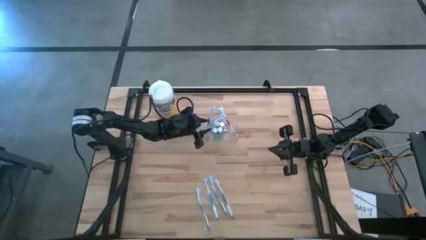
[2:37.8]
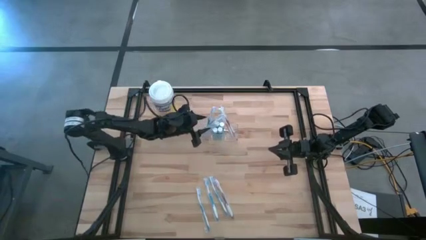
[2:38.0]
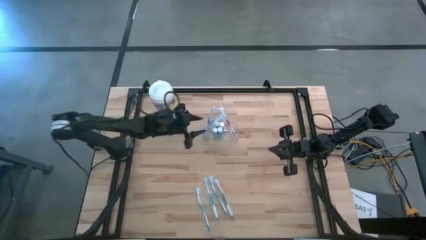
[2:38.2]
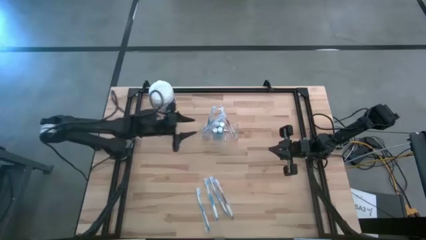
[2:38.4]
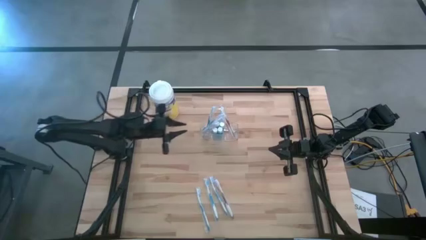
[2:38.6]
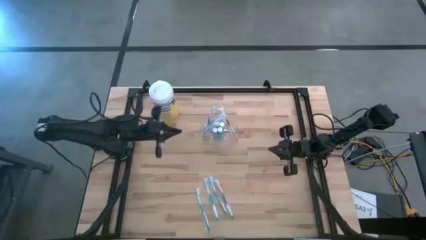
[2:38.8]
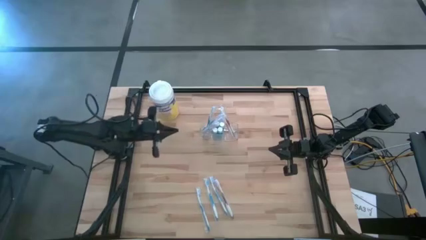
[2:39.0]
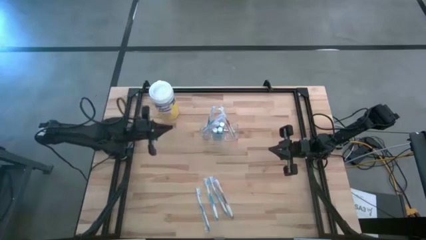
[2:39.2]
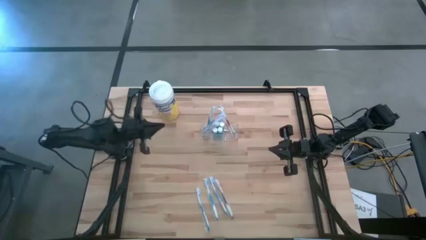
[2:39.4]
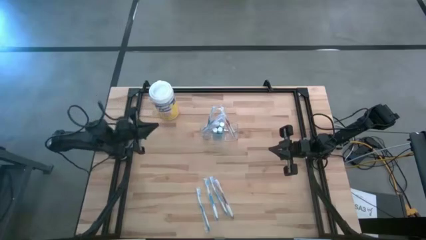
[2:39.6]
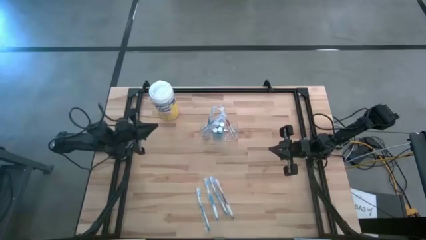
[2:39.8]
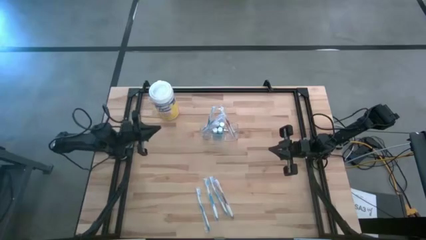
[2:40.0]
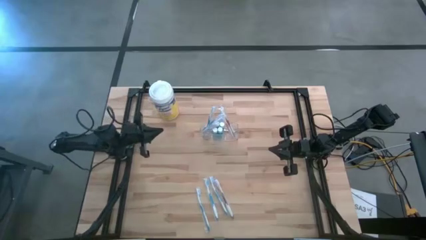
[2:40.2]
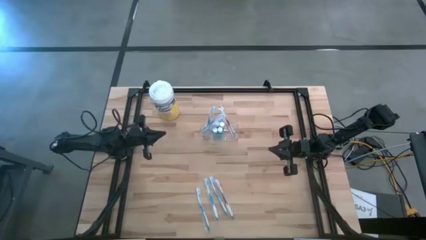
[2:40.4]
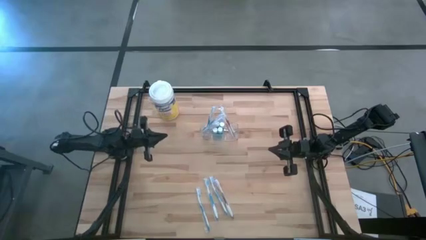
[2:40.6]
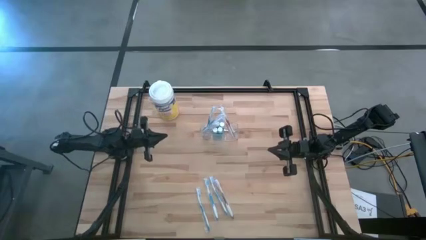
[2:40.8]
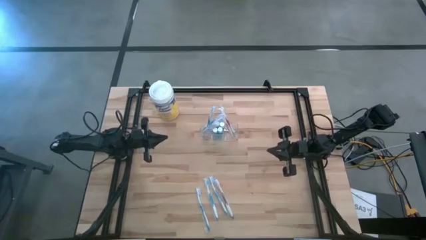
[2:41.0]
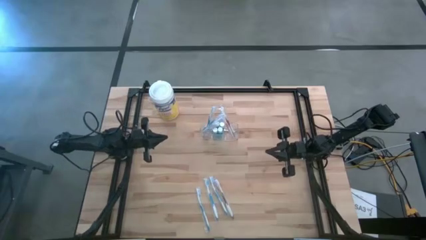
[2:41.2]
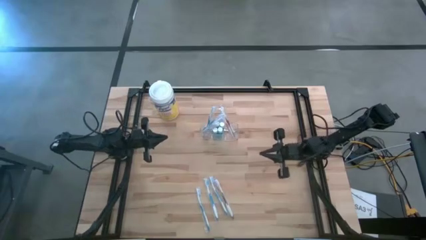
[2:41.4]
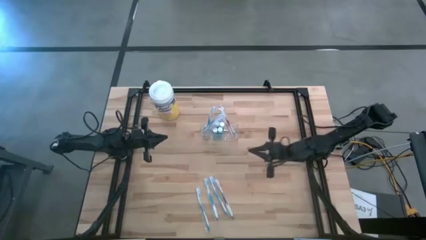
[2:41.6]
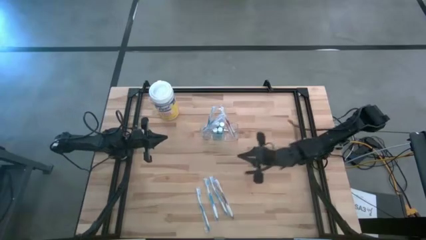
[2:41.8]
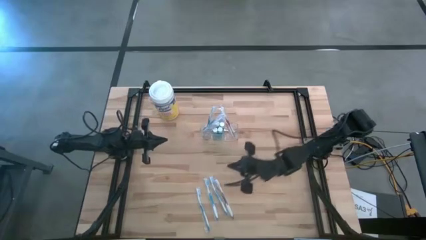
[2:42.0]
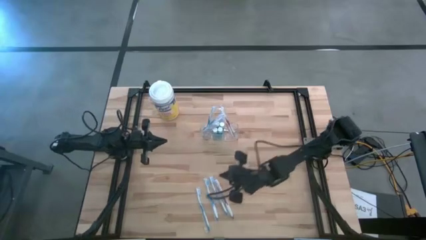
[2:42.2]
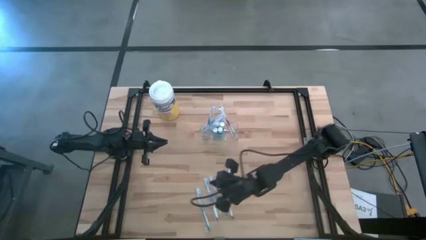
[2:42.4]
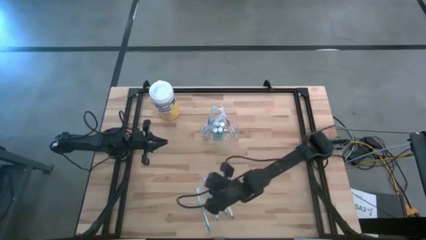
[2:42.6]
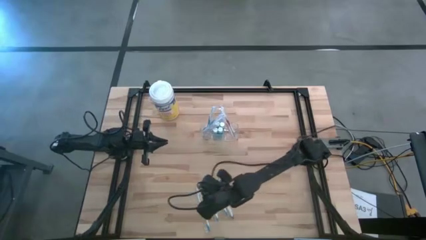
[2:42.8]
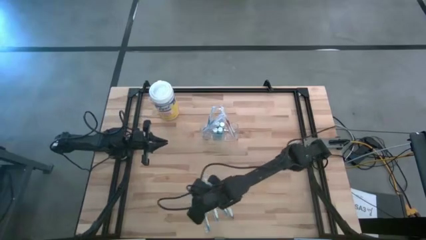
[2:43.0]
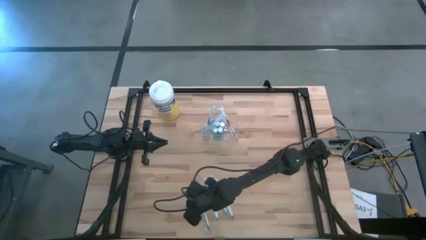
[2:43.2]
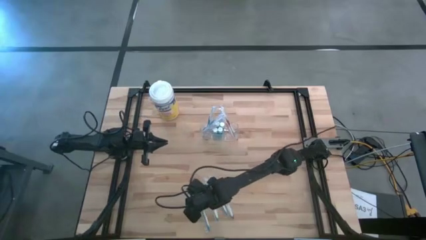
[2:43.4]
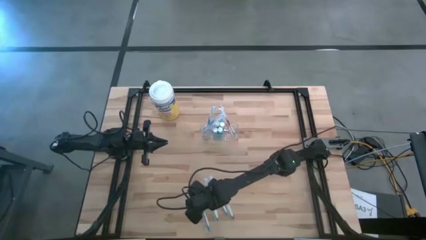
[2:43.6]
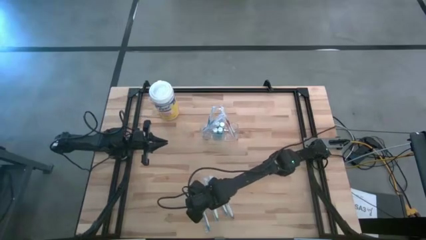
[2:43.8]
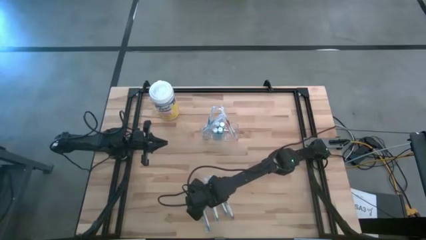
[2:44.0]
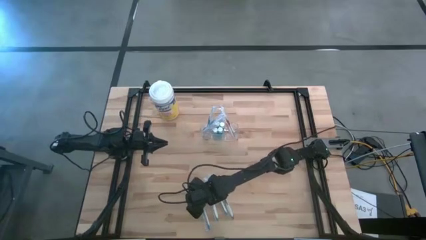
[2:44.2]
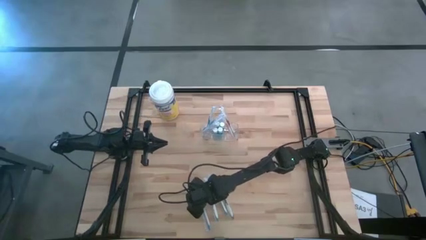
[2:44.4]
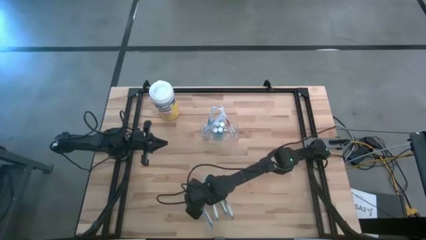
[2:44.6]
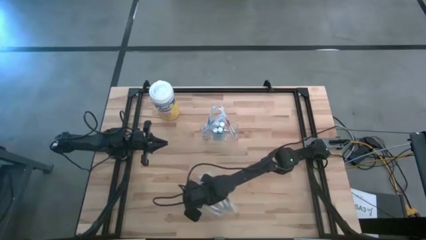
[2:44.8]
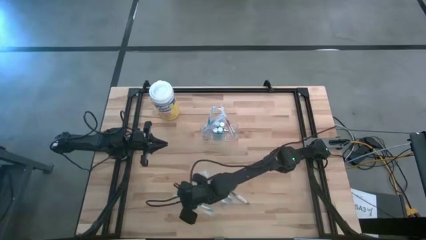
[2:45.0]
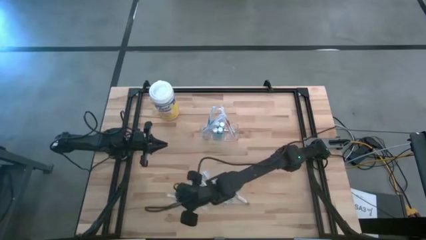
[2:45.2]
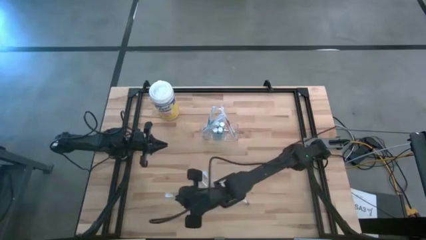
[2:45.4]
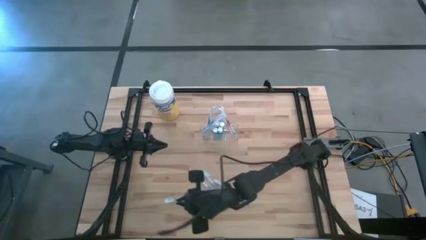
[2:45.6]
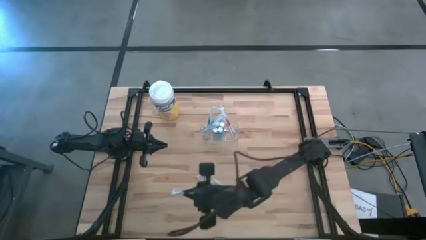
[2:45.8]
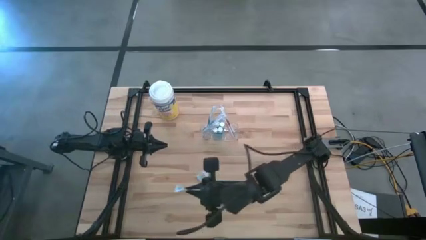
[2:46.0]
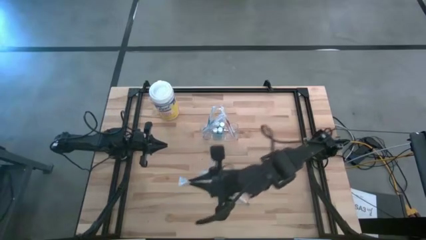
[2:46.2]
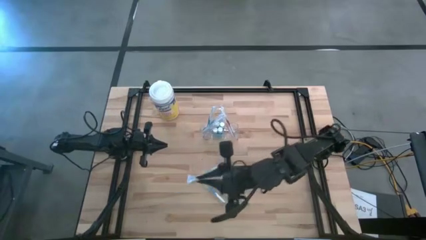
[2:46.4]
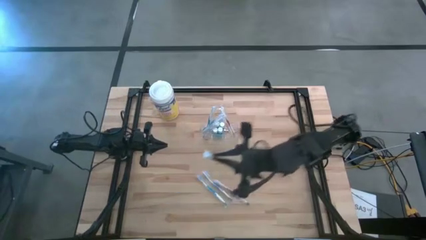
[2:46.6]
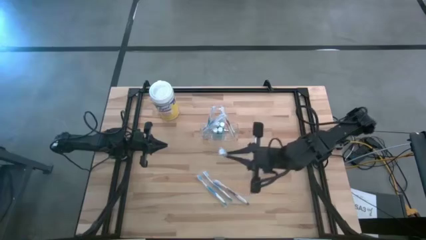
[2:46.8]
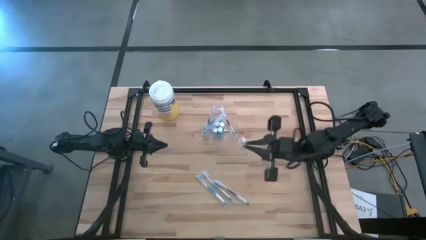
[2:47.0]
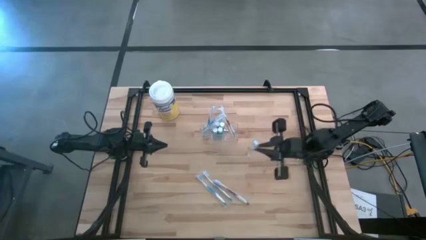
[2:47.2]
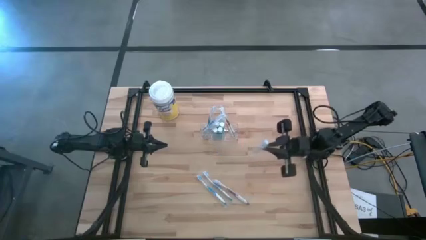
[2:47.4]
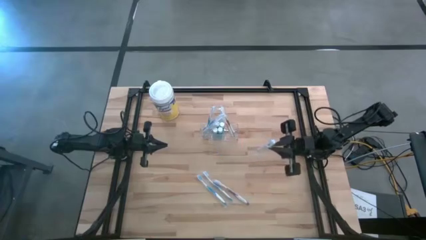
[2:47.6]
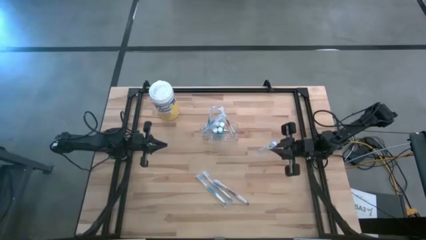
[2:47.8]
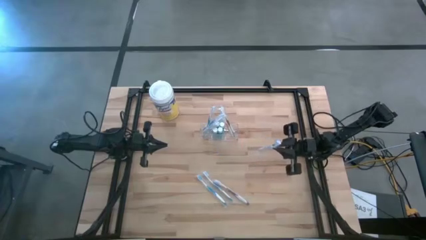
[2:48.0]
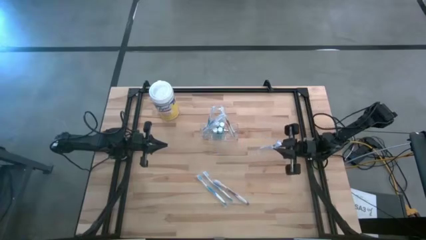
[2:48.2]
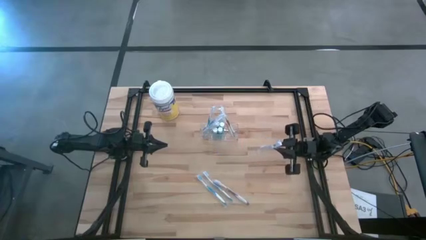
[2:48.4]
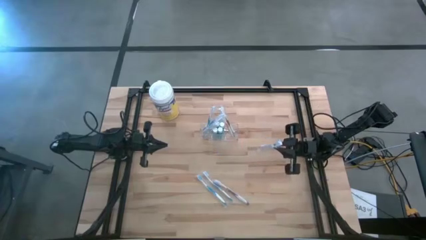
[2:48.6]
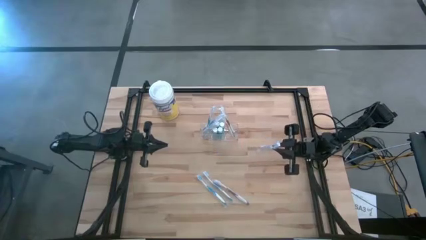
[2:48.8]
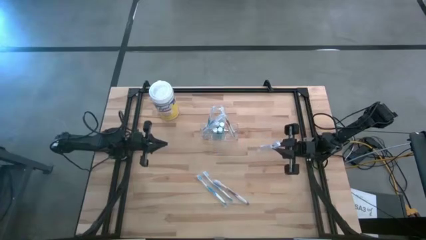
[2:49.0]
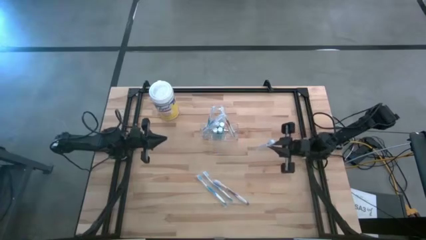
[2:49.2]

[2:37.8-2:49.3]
Task: Pick & Place toothbrushing station
Put the blue toothbrush into the left section of the transparent organizer
